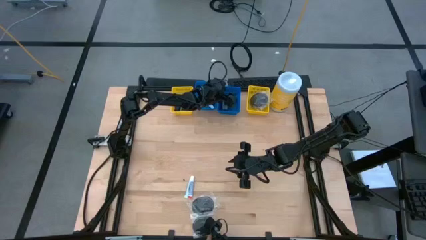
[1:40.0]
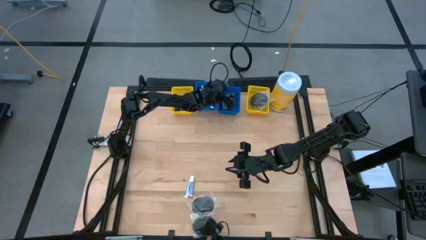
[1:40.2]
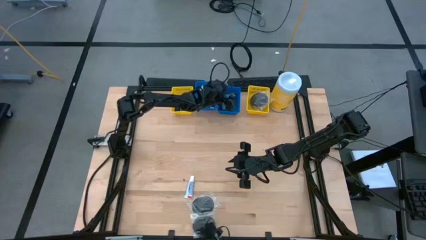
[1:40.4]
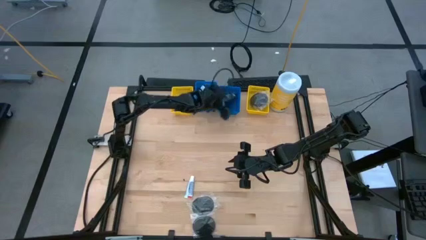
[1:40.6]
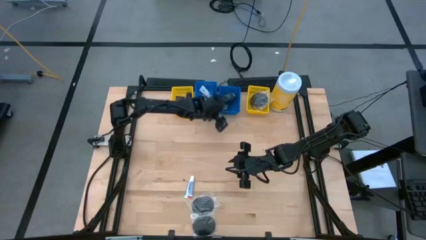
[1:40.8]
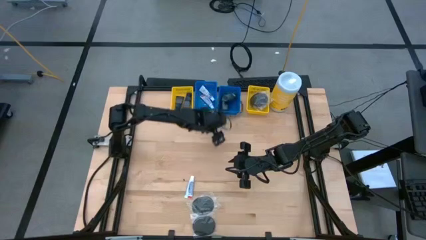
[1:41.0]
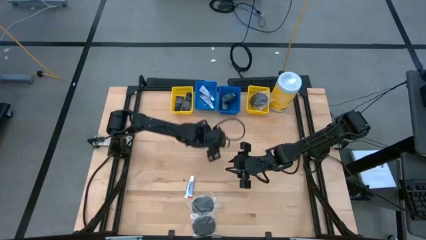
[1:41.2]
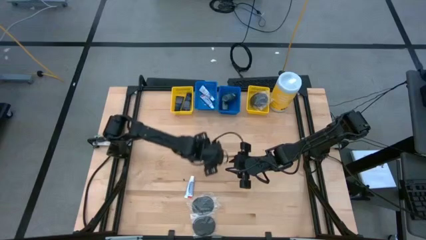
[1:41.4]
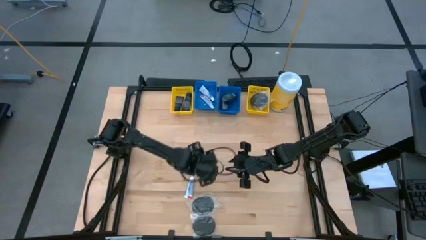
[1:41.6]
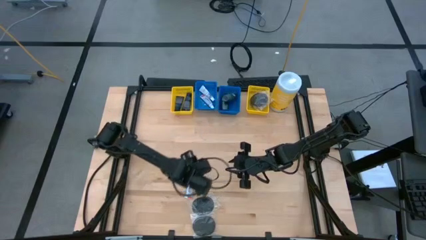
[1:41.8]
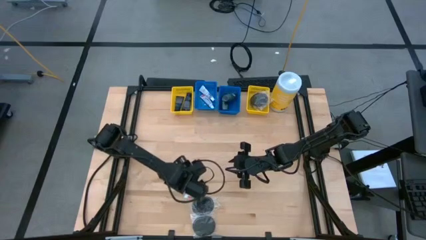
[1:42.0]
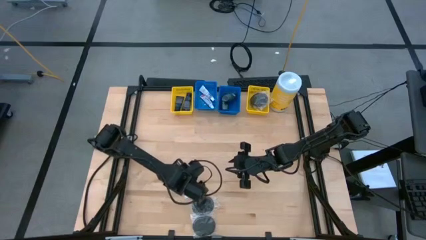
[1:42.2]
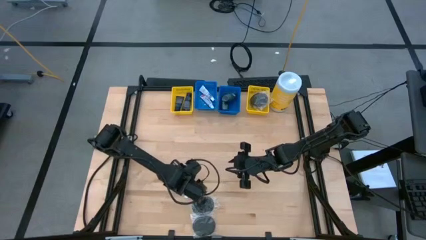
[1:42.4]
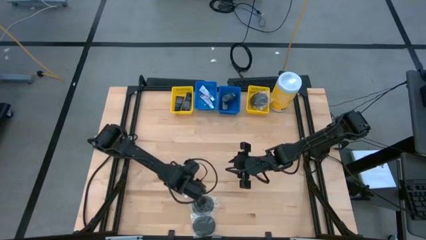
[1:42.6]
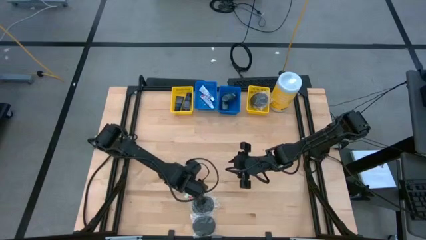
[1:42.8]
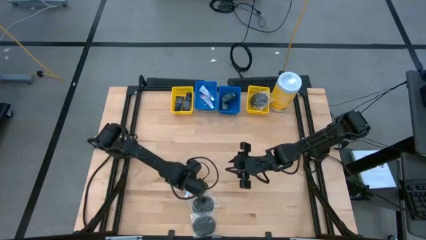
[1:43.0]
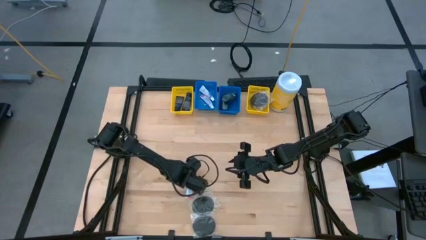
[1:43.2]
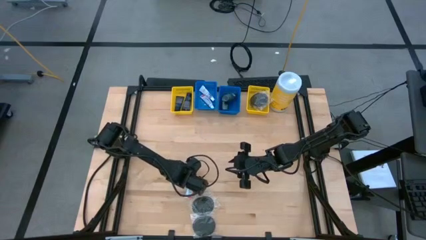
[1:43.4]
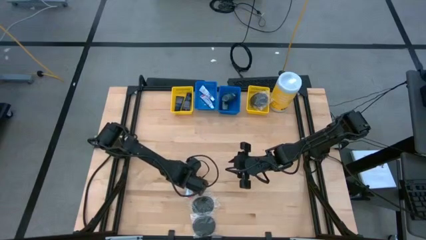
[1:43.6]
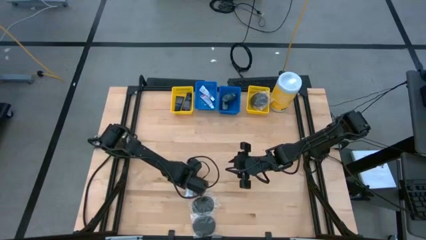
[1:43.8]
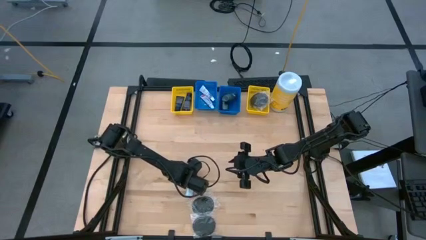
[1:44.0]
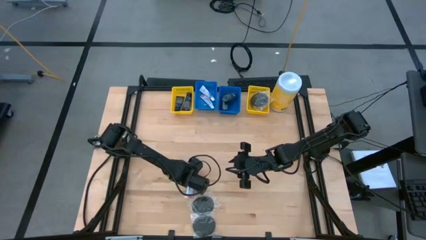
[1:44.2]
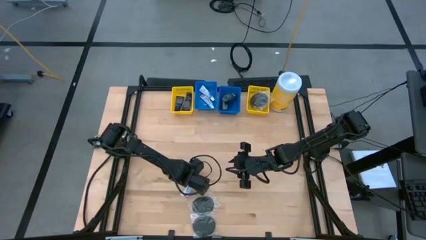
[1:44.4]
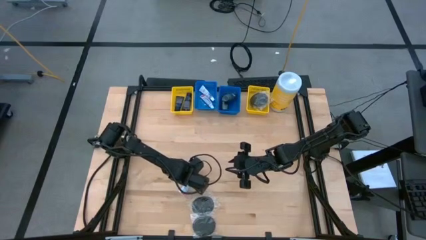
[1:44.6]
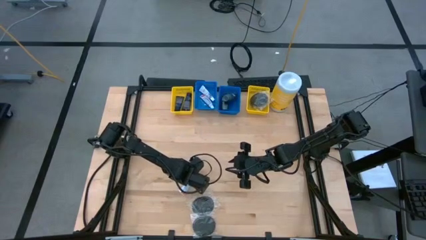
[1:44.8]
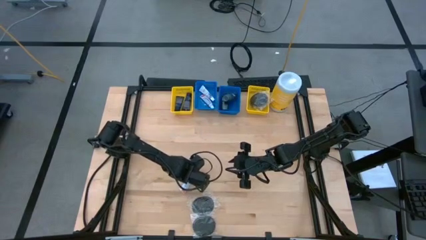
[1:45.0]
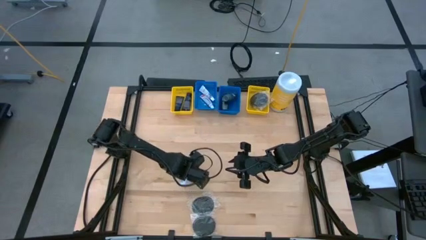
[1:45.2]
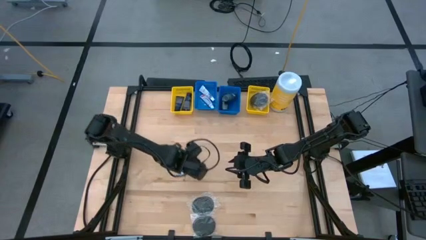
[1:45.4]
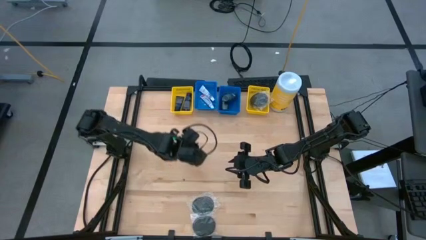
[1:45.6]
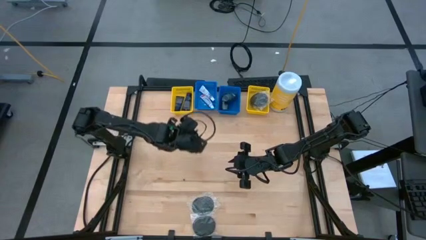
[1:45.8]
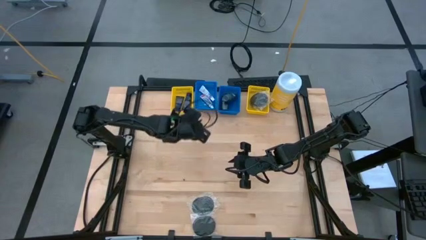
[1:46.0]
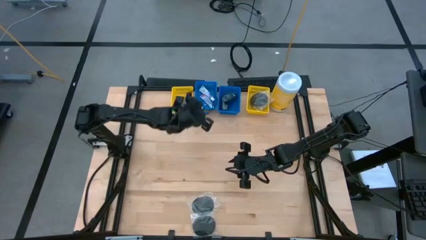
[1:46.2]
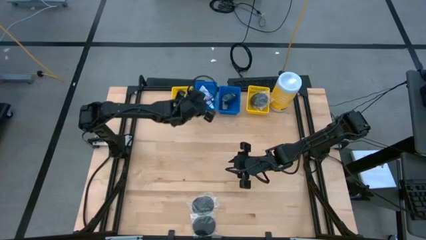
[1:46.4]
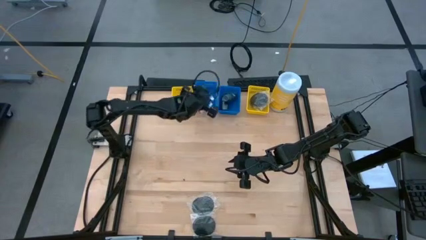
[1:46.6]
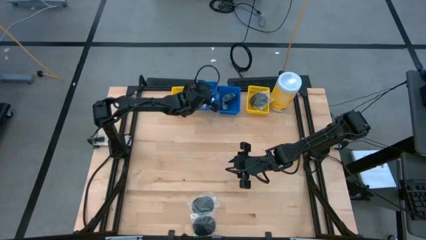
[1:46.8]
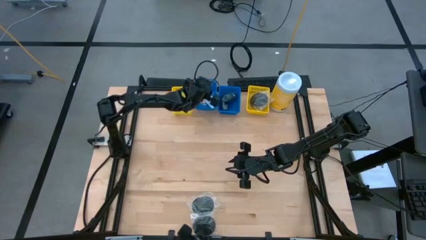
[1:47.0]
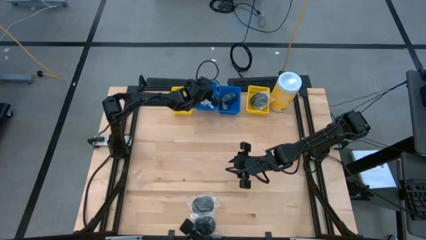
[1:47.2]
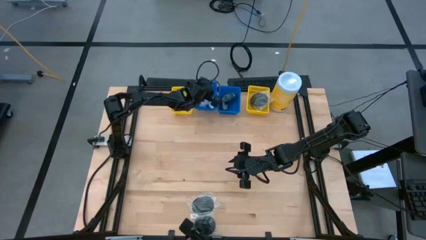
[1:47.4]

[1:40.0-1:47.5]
Task: Pick & Place Travel size toiletries
Put the white toothpaste into the left blue bin

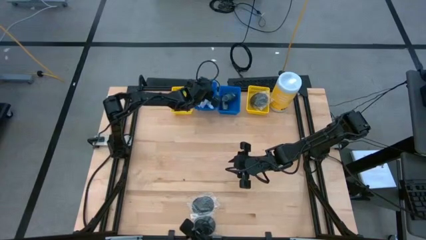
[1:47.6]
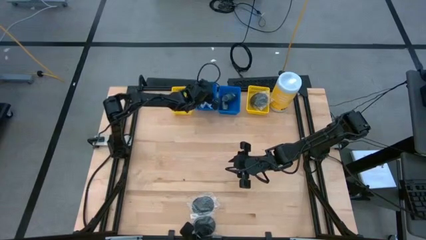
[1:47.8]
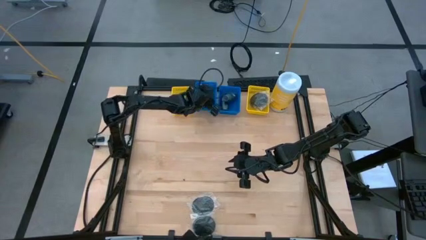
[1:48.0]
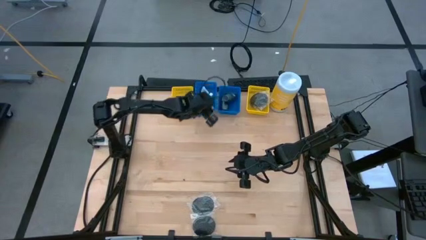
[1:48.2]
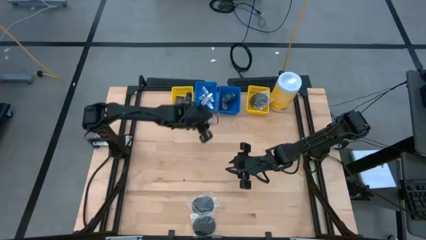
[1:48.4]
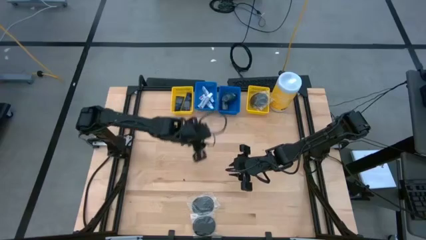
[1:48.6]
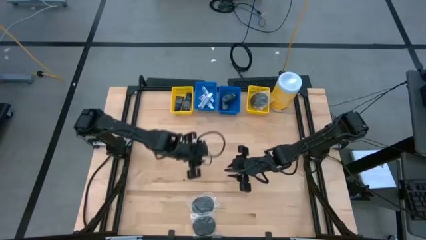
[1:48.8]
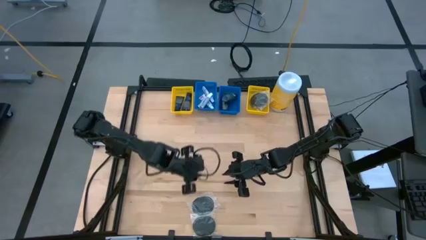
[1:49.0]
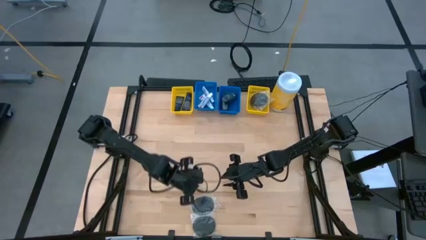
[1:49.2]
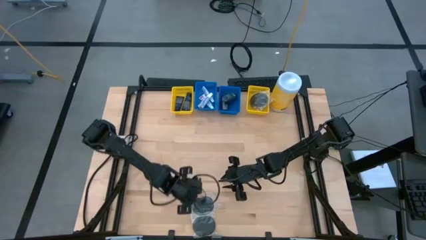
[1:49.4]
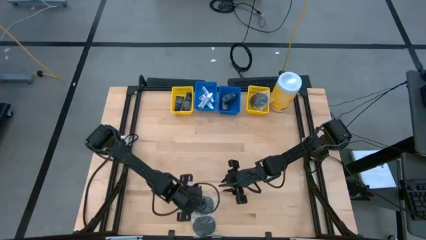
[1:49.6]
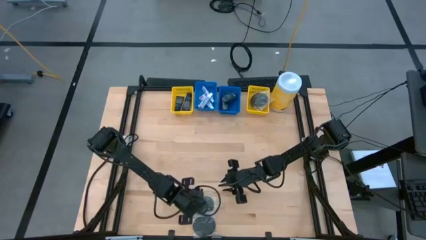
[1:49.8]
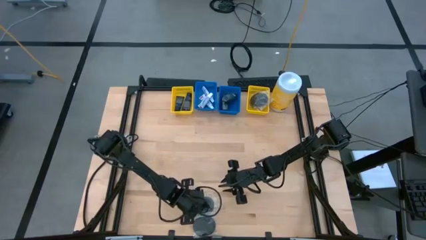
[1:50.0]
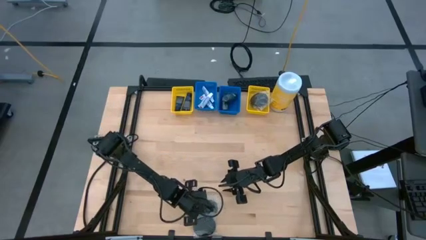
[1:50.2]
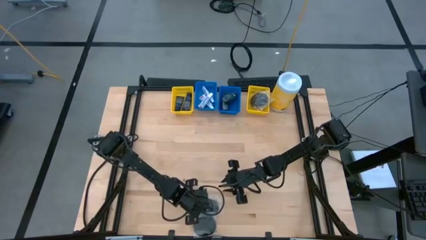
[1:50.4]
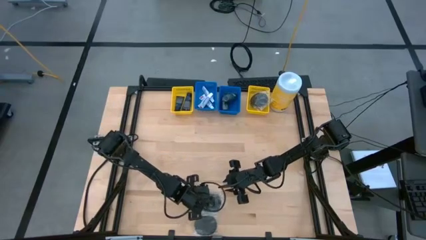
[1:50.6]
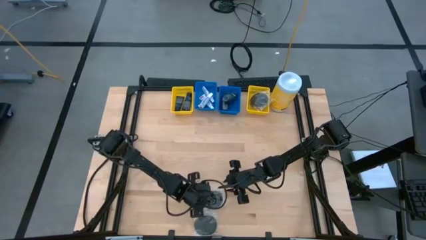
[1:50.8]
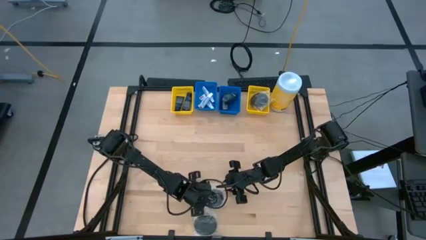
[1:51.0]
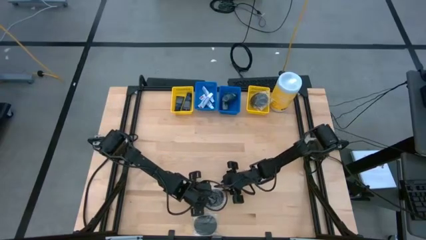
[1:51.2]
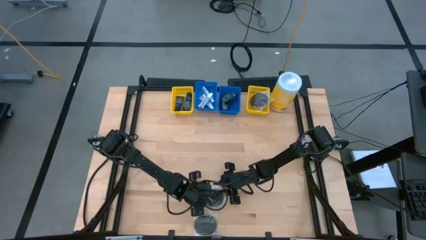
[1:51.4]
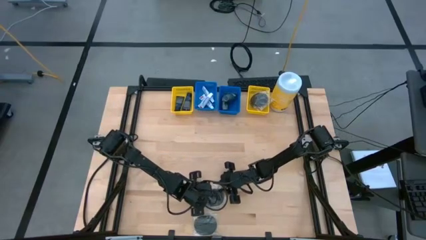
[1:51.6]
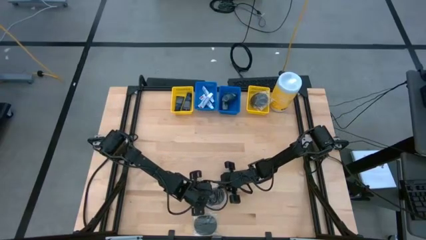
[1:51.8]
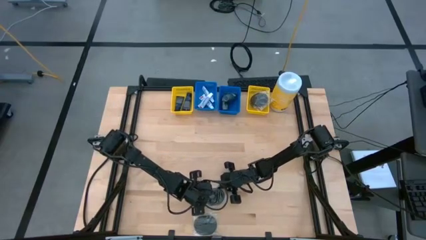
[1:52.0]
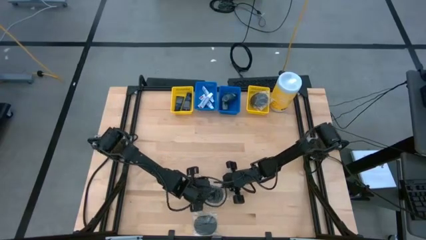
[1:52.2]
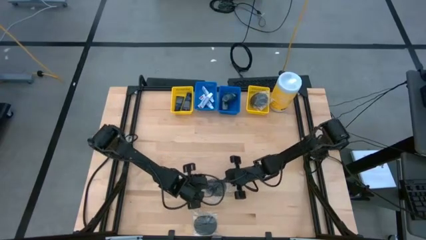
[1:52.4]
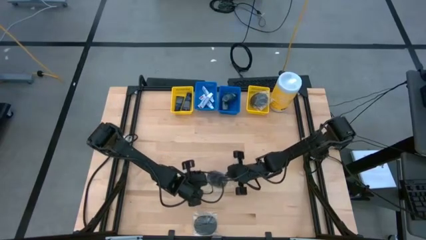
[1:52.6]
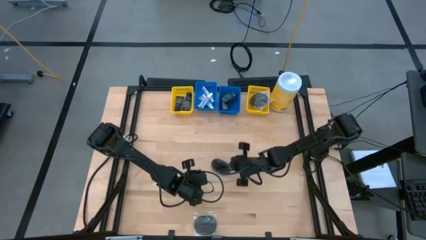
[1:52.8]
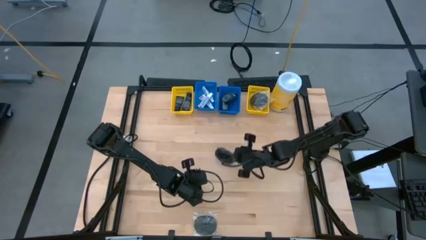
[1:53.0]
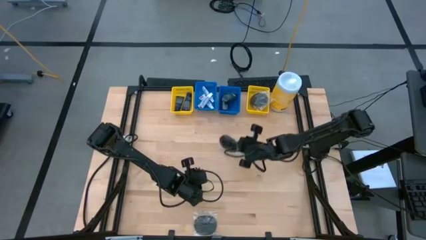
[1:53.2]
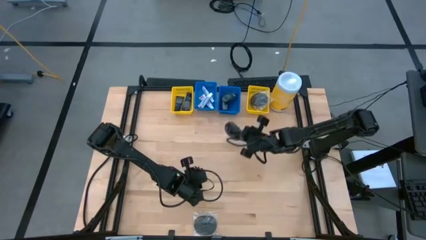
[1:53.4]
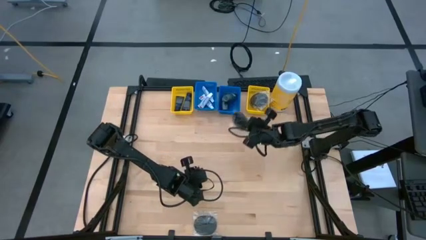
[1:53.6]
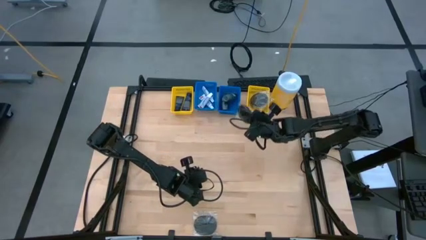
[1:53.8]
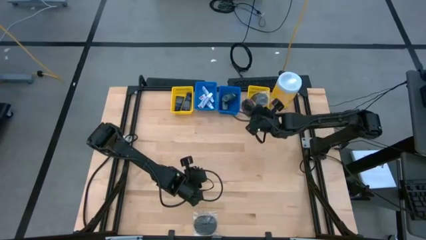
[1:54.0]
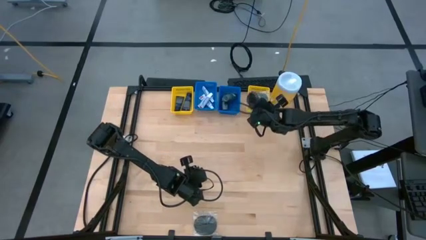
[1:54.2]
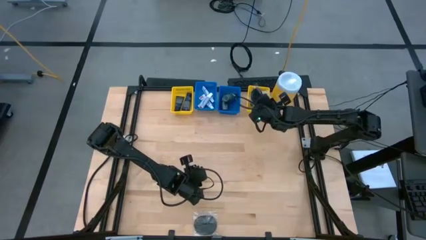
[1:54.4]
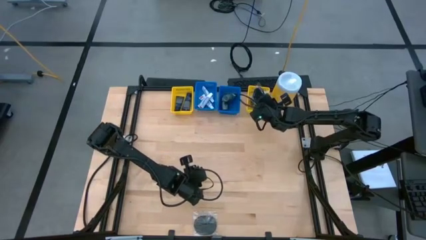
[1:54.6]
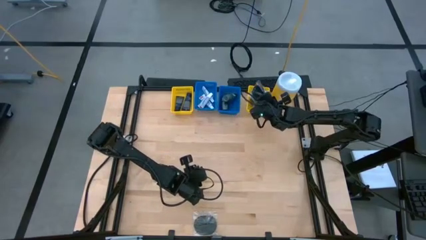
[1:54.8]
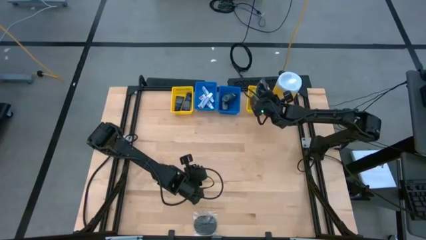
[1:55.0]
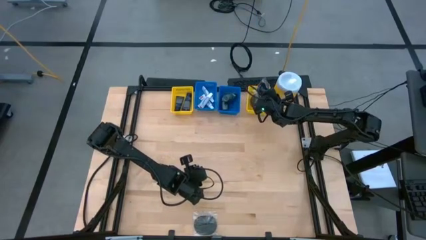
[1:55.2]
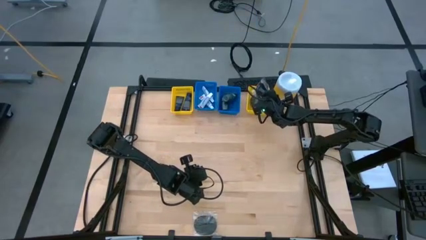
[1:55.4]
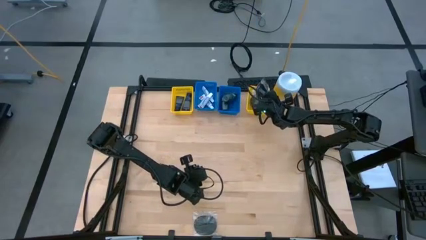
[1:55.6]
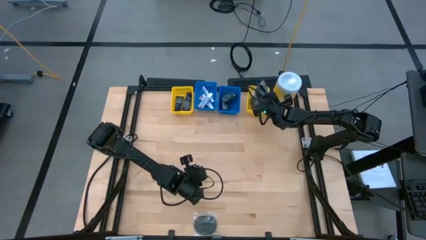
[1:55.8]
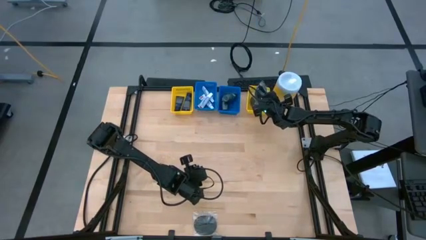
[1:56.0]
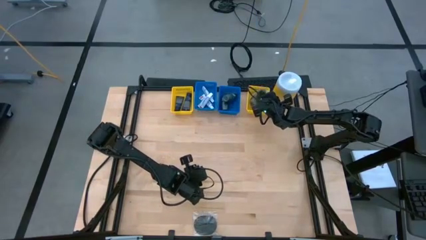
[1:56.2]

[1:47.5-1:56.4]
Put the black hairbrush into the right yellow bin
